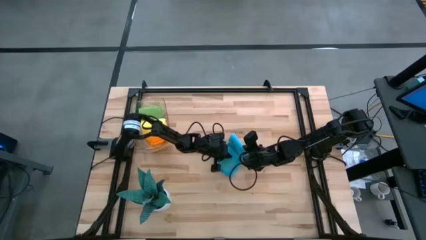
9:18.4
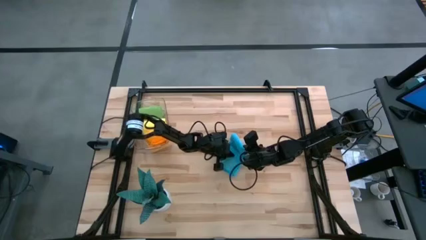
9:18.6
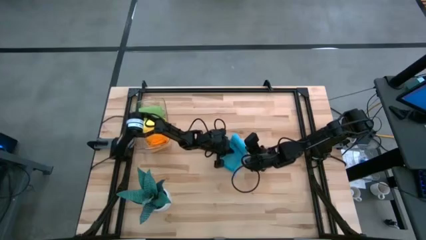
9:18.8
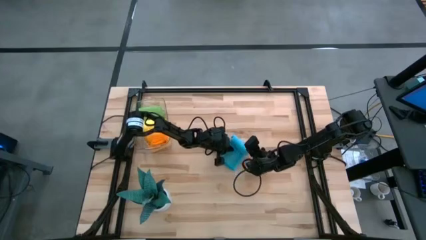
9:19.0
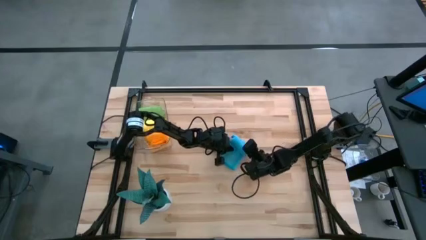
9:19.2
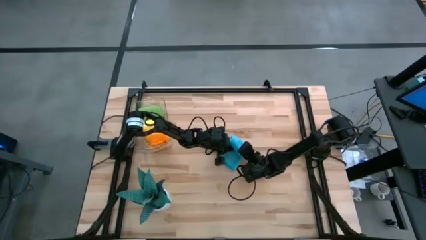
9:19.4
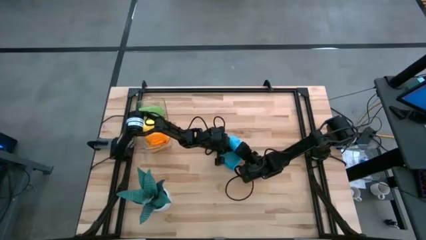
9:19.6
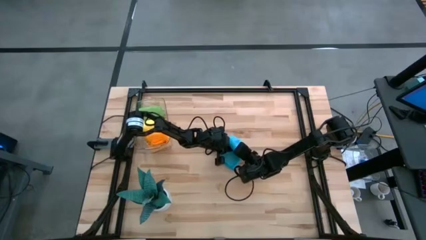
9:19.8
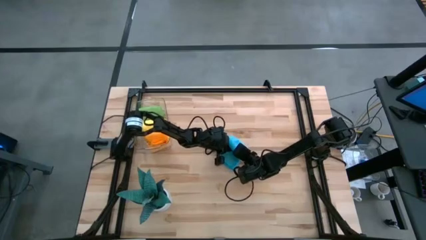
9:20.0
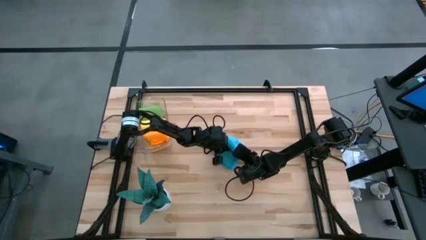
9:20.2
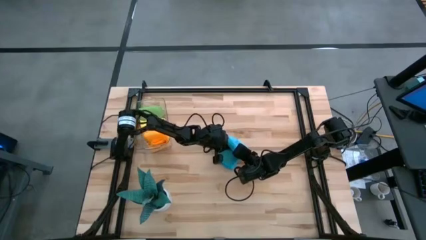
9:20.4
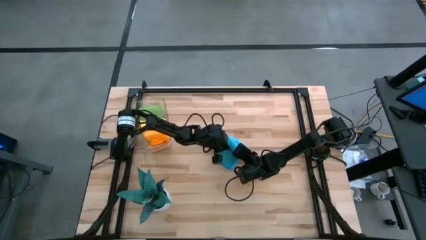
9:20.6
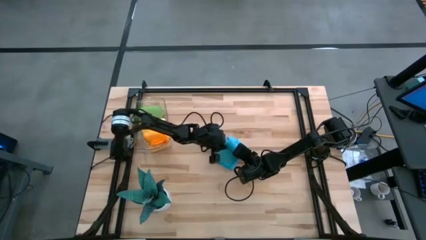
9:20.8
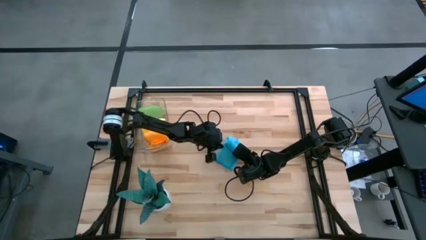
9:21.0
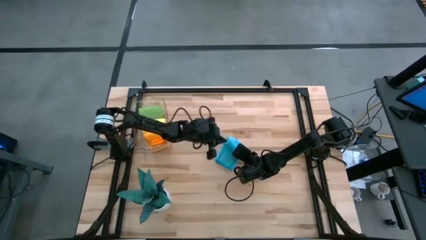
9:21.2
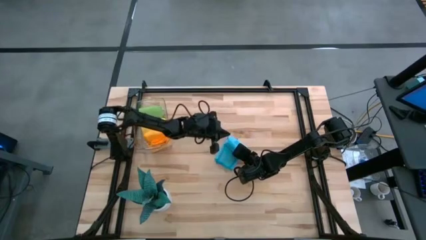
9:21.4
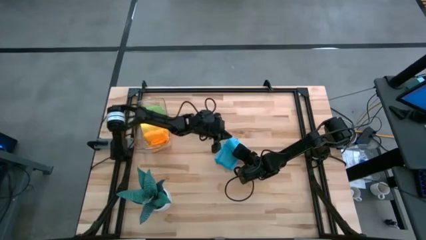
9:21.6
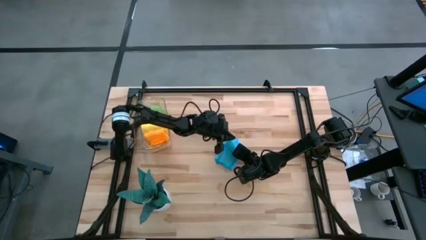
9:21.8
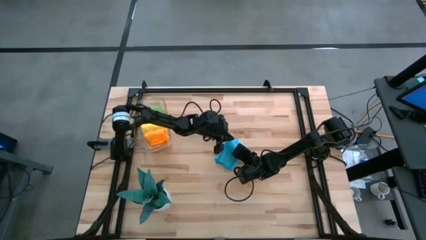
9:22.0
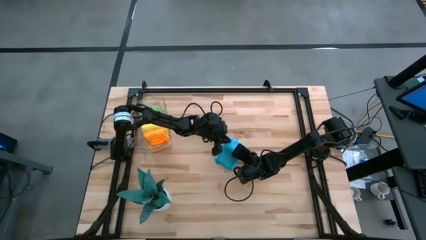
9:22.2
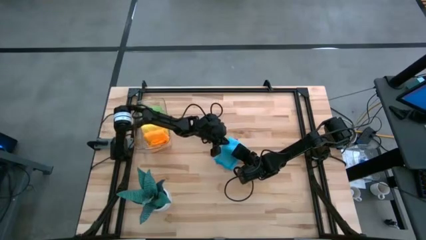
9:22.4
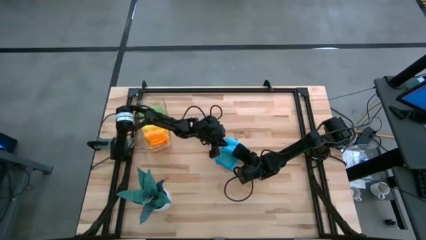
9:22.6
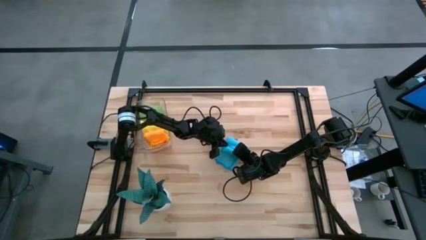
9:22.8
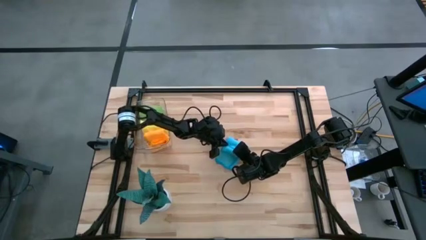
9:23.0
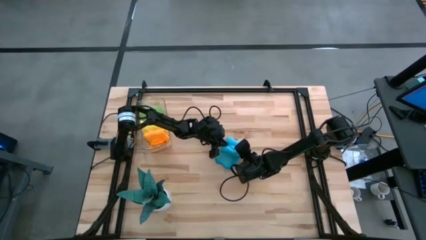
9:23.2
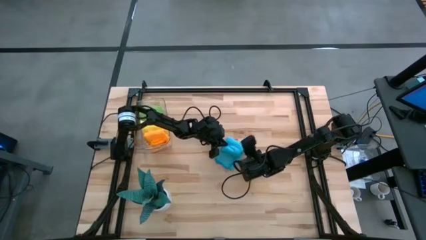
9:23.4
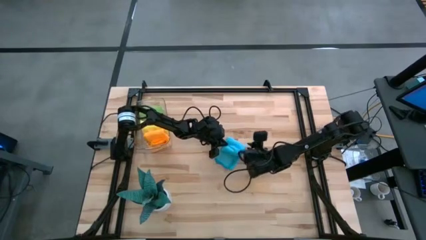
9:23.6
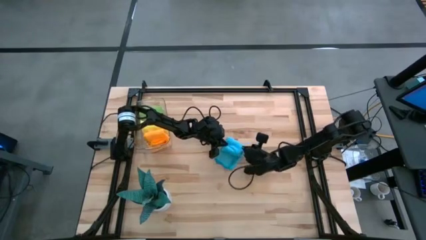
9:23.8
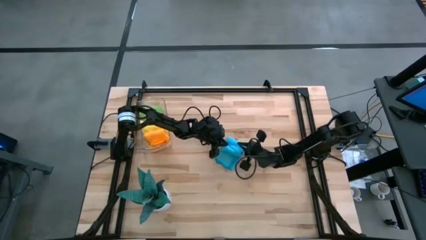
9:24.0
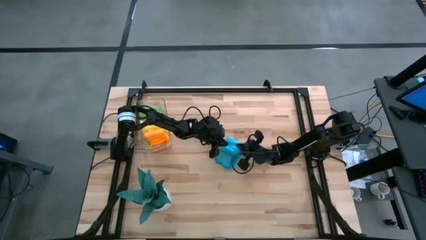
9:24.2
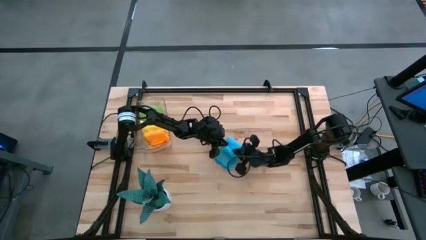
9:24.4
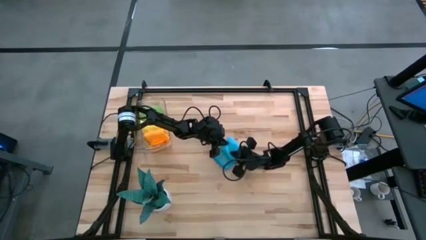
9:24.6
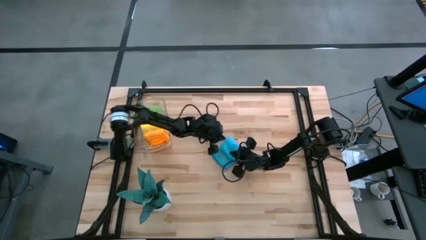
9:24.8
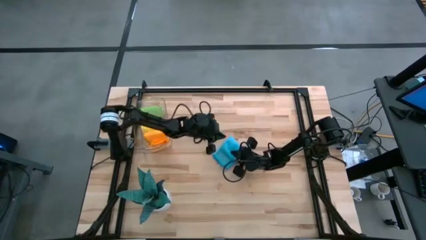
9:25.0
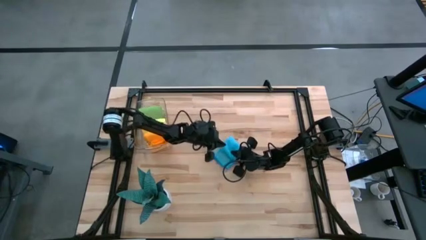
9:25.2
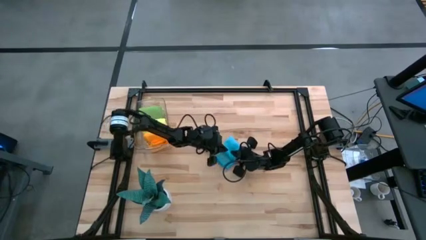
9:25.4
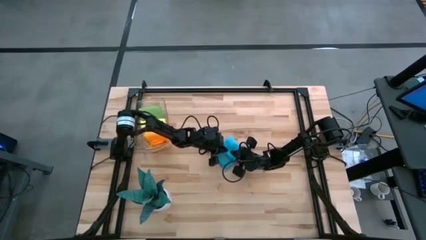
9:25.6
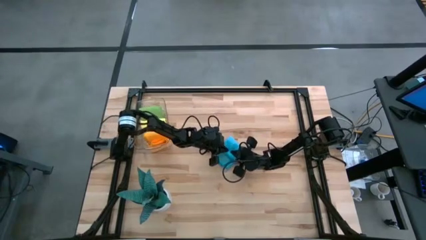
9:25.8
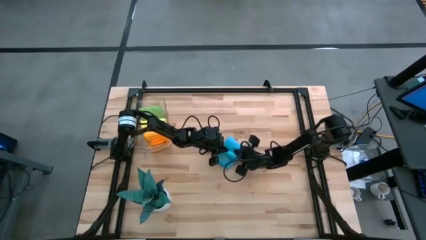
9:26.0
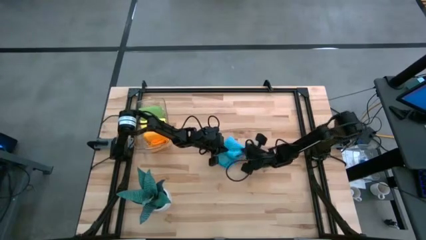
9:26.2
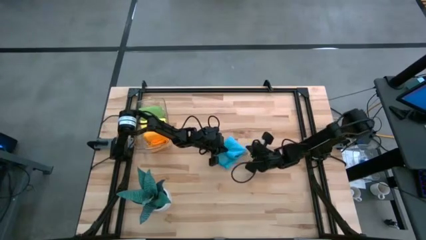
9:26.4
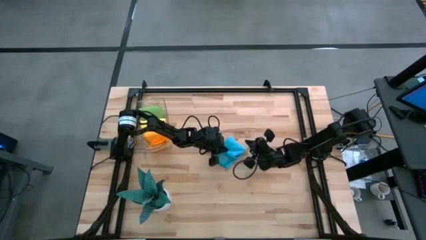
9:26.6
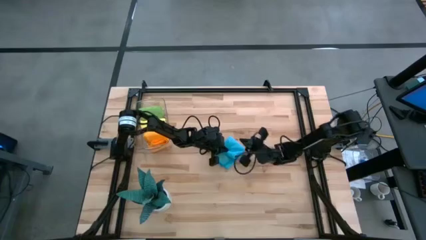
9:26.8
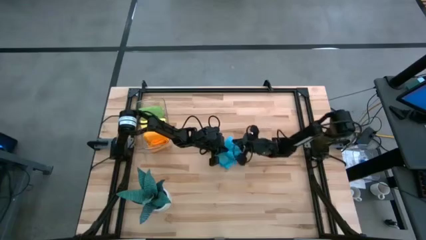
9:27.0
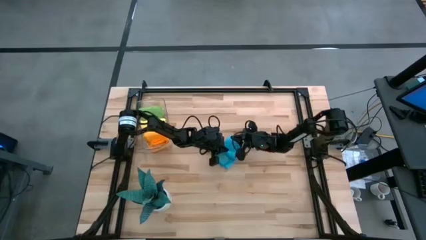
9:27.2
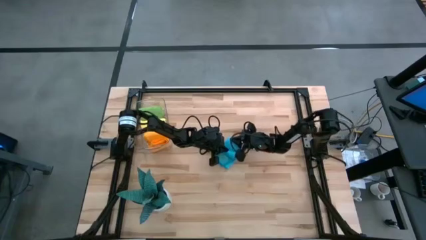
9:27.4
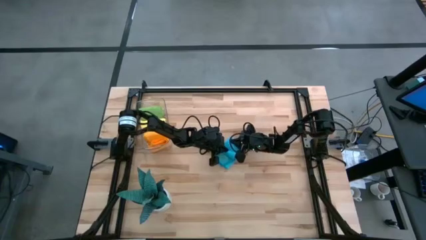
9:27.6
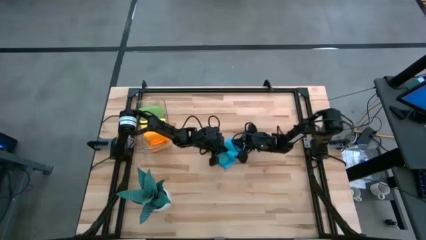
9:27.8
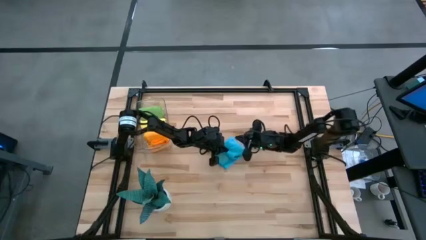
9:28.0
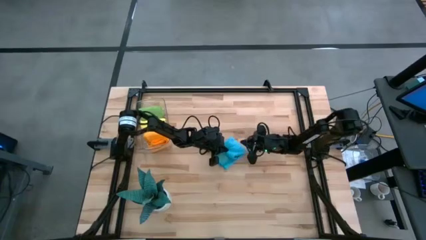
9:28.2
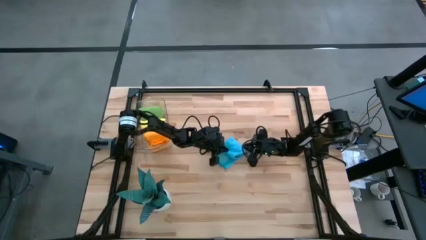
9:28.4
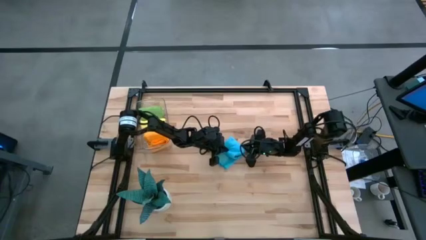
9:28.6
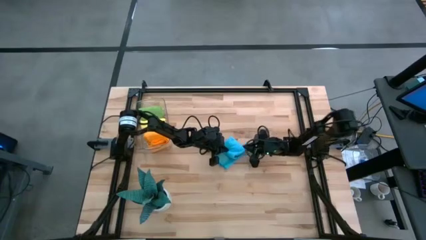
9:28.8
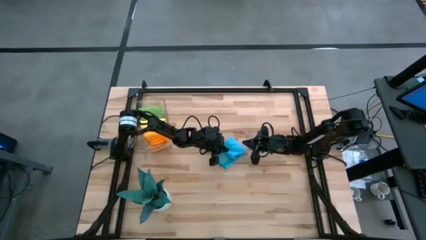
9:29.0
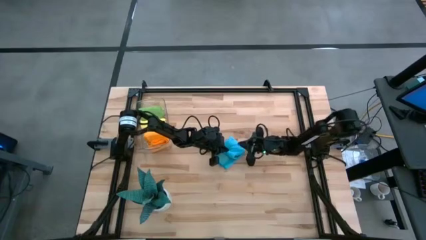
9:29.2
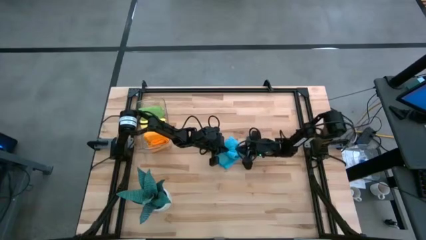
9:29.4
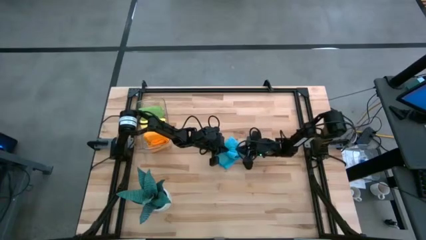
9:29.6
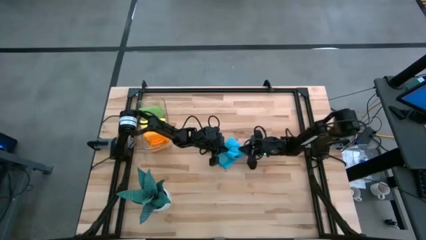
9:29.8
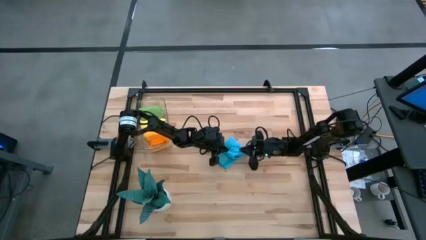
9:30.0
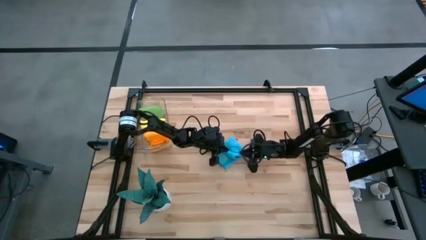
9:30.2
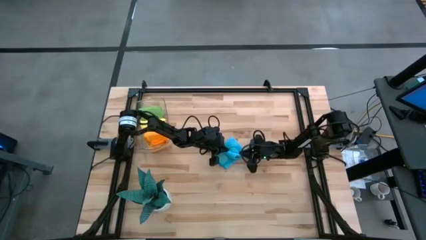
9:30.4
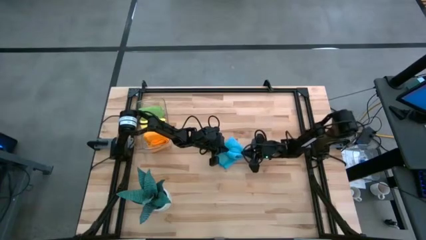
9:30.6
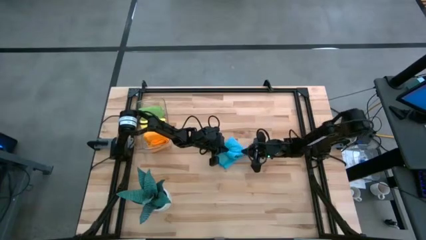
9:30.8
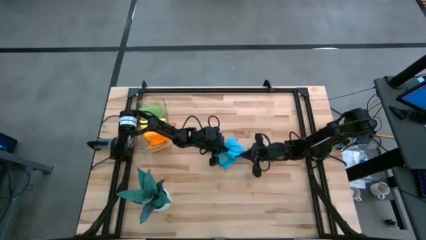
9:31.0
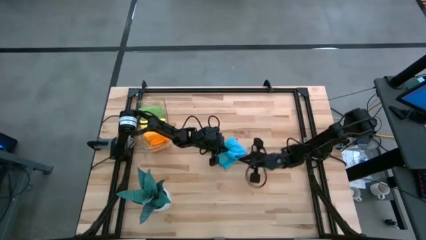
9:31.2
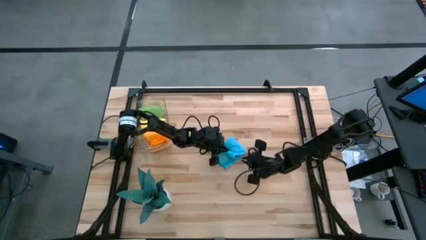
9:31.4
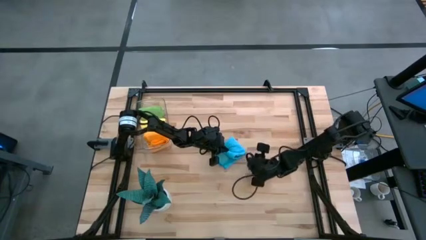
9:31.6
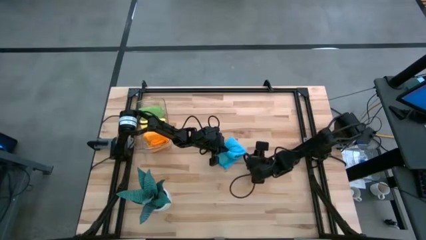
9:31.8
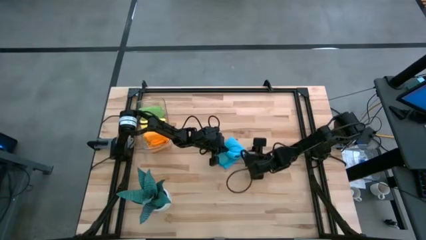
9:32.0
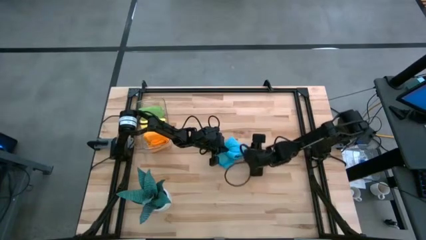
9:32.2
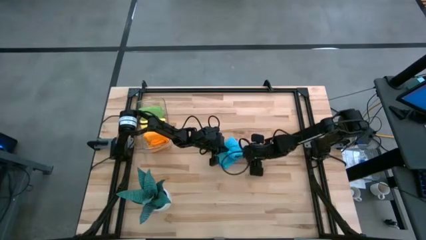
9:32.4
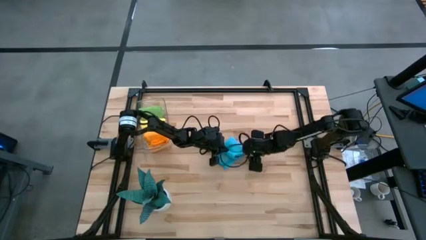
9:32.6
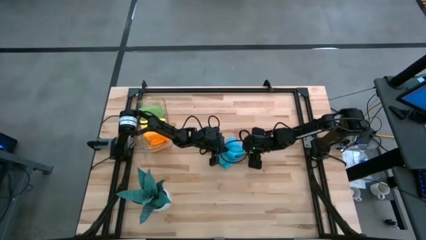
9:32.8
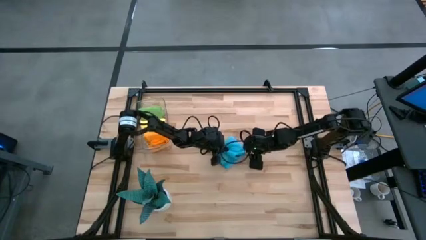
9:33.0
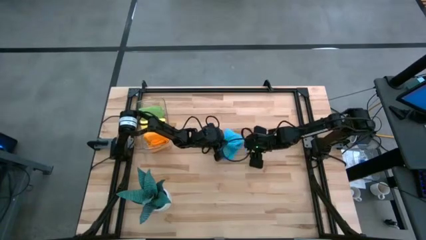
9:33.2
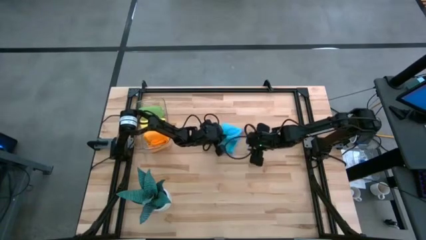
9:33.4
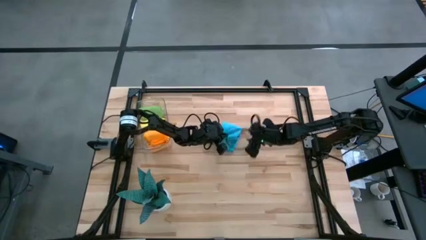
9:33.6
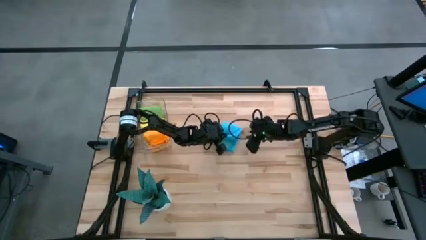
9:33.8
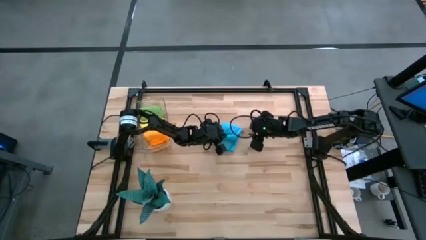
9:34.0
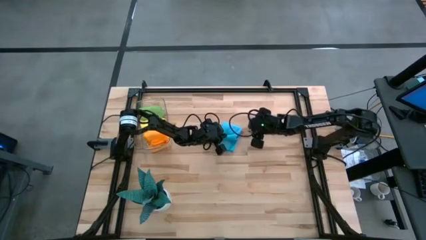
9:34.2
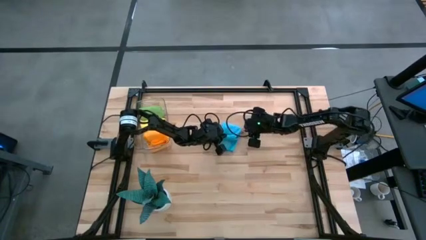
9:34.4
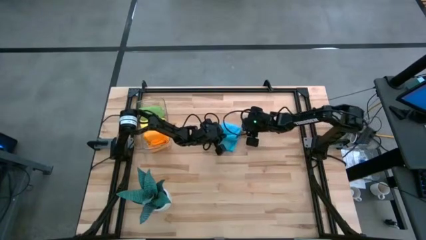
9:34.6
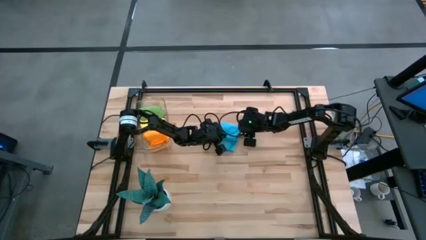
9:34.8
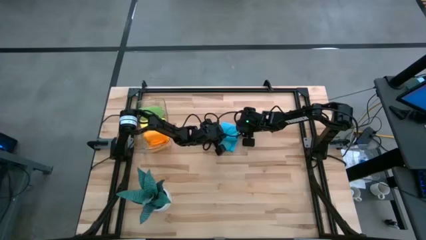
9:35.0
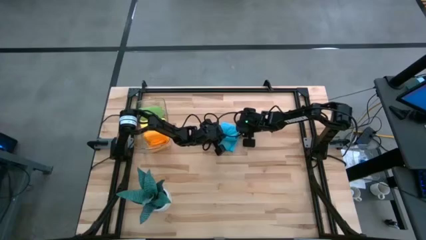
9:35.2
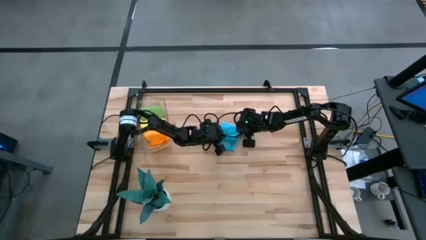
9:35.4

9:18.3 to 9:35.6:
Task: Roll microfiber towels into tight, uniform cylinder then place into a basket
Roll the blue microfiber towel
